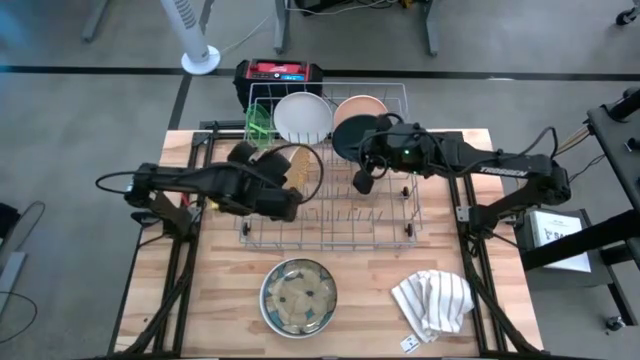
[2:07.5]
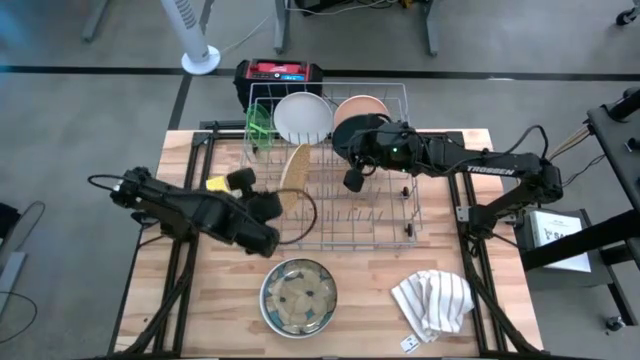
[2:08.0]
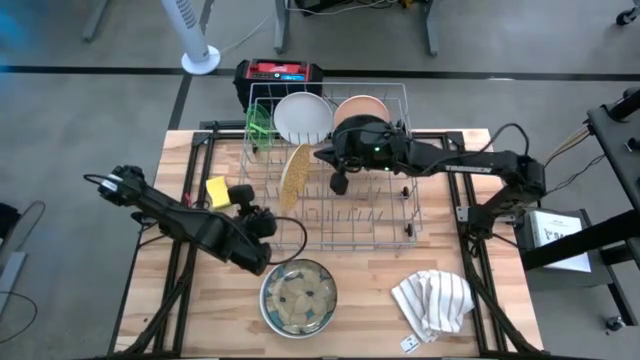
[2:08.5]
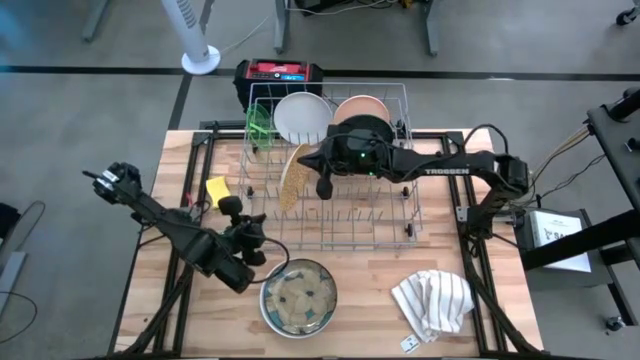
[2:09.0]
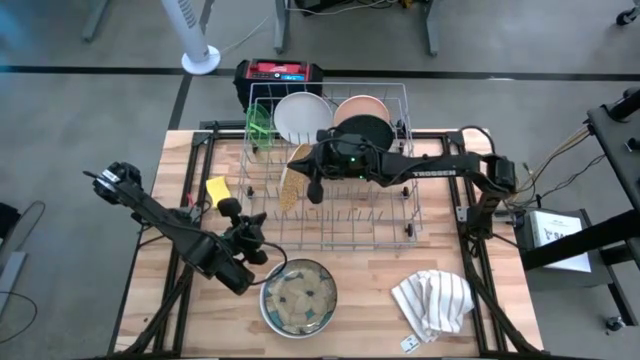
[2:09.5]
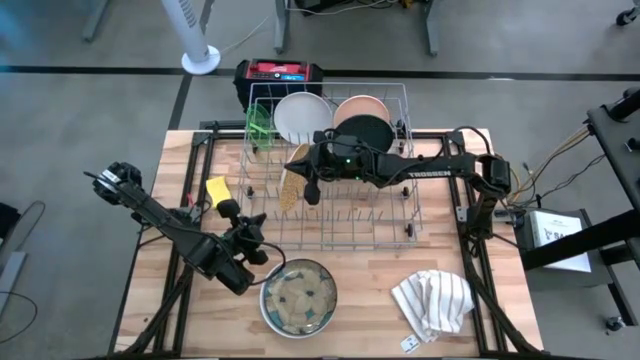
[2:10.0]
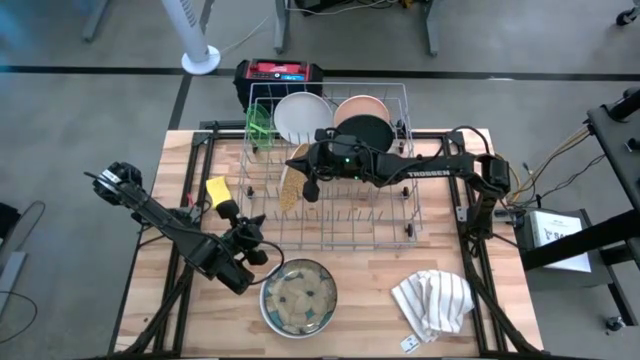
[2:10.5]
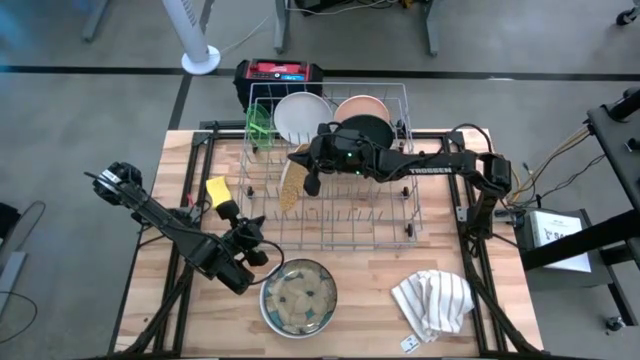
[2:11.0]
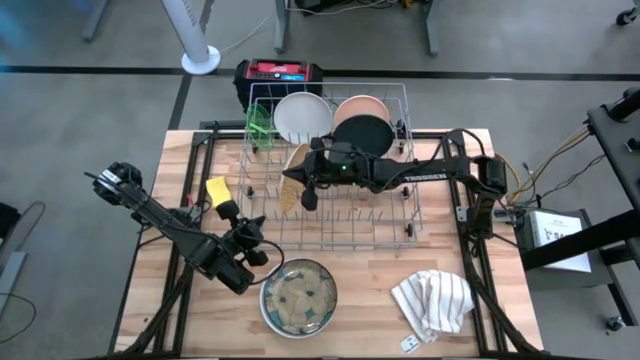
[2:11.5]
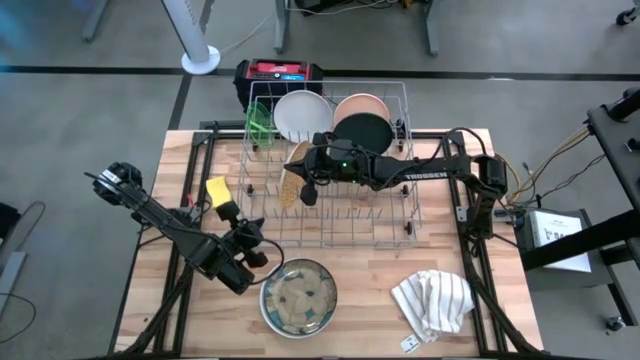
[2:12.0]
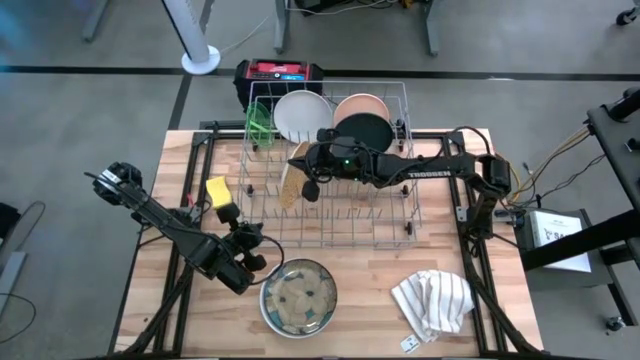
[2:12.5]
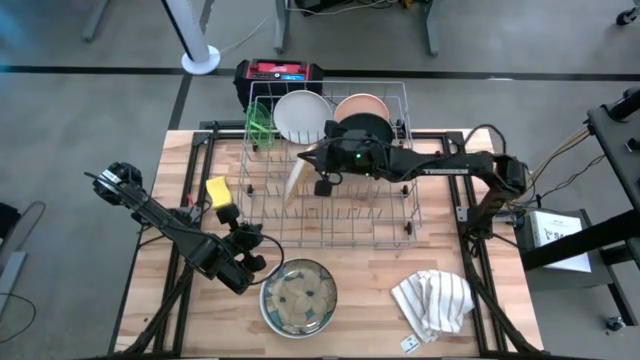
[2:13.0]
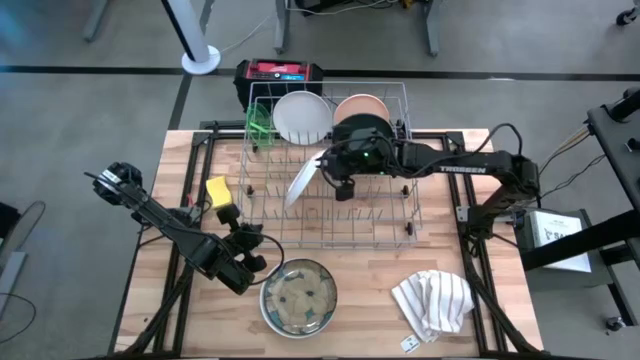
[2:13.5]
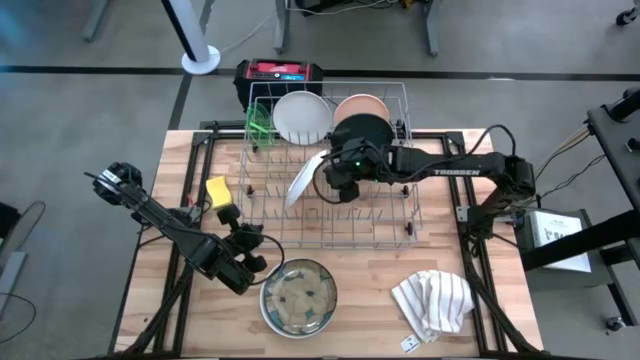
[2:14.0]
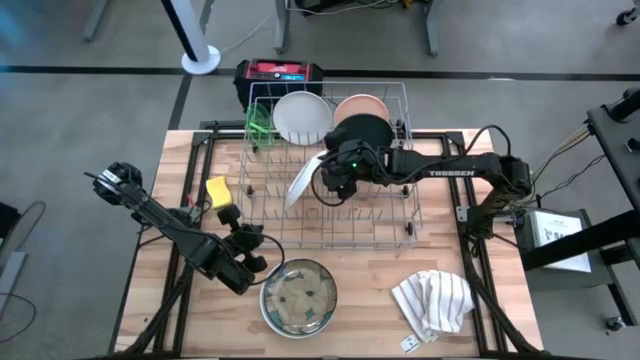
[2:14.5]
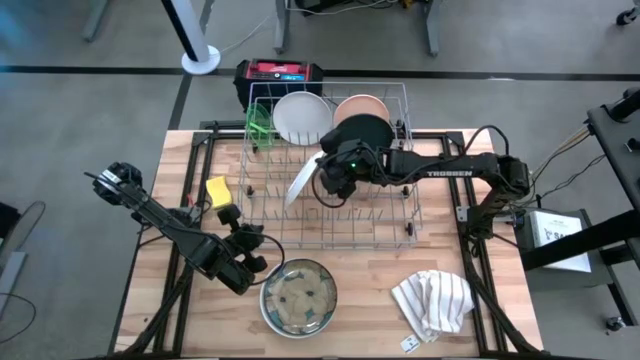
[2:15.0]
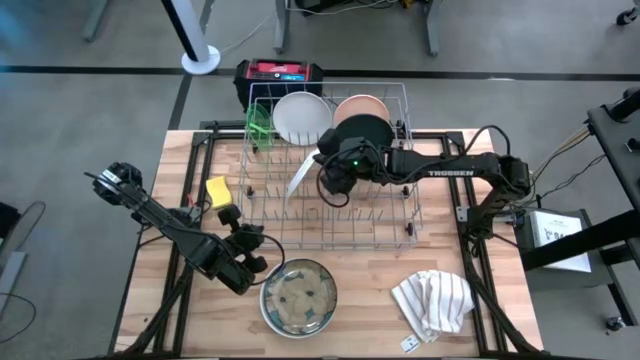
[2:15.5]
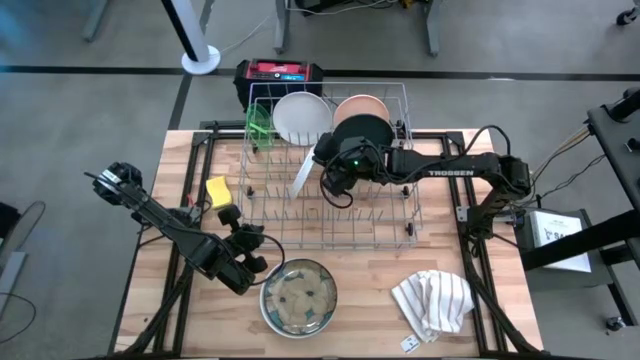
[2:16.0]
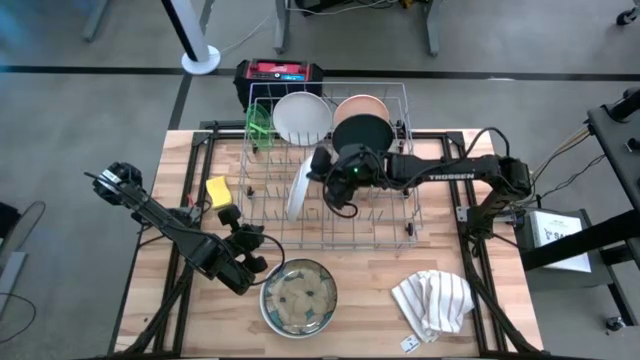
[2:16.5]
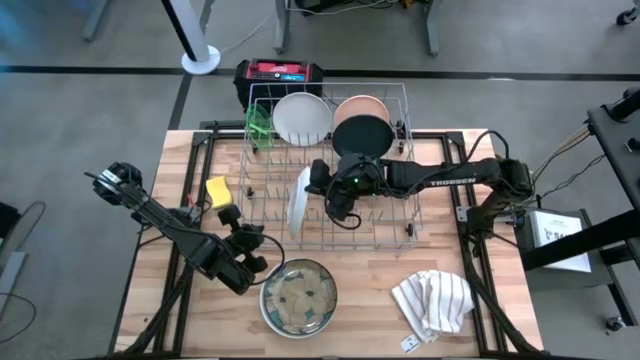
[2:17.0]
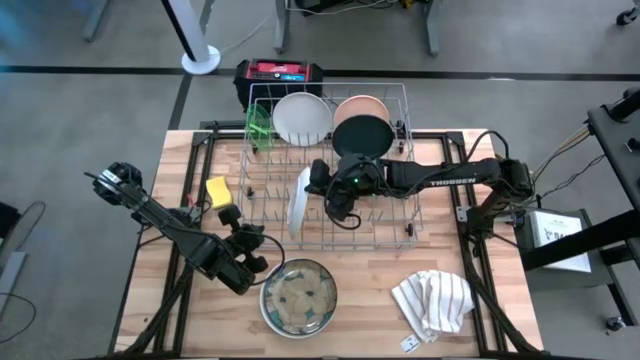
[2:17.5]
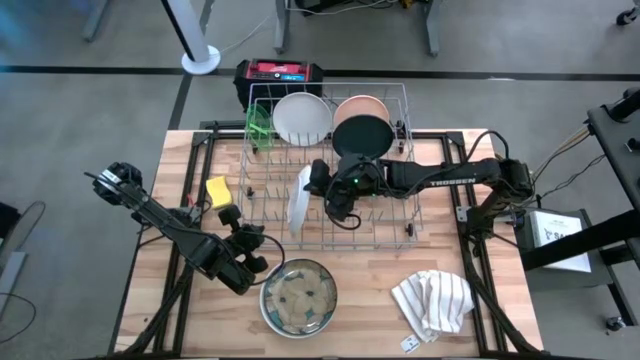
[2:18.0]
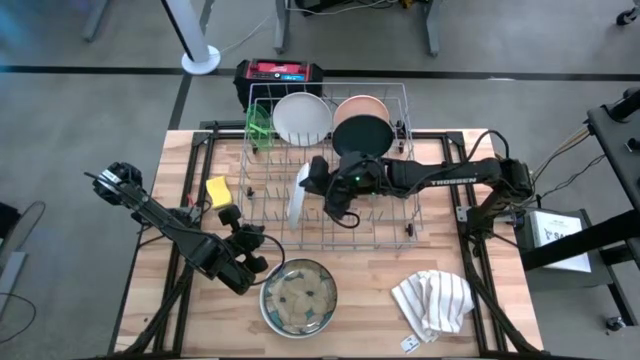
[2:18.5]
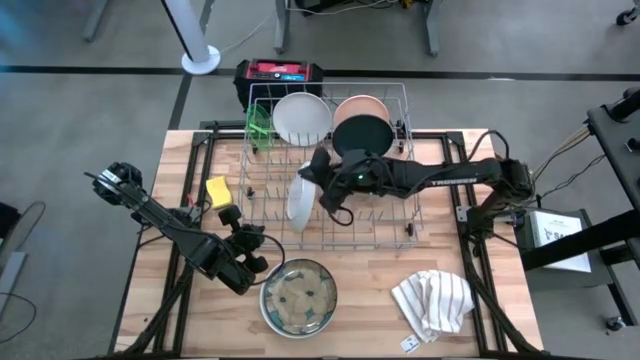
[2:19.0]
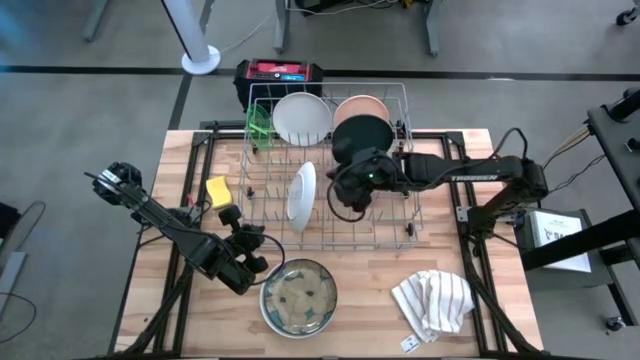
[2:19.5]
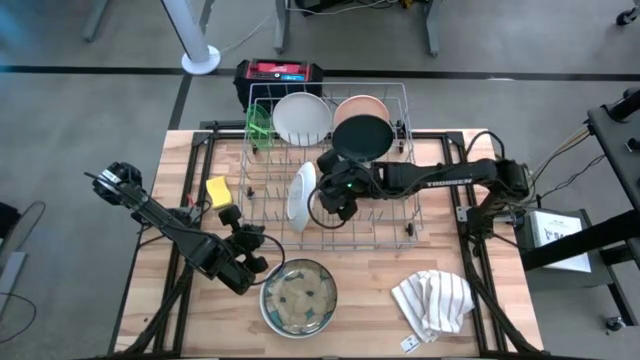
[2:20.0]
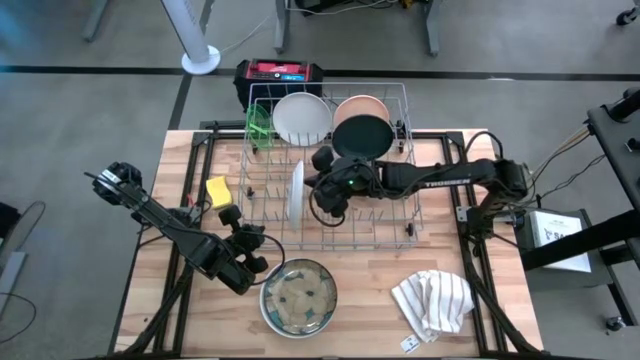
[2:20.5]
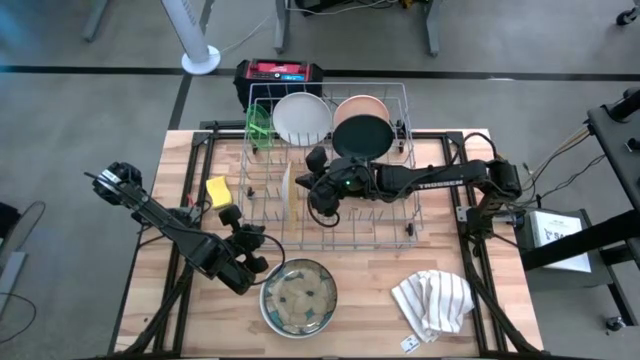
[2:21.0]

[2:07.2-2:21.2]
Task: Sort dishes
Adjust the yellow plate on the dish rack

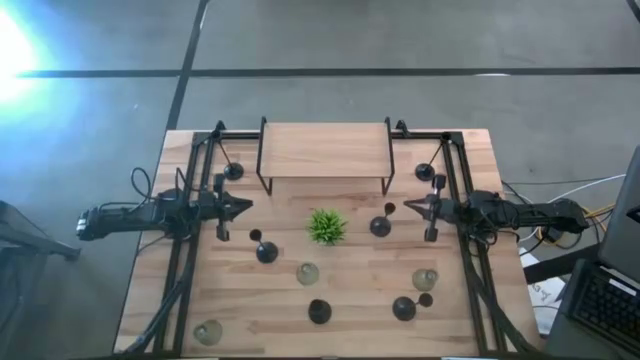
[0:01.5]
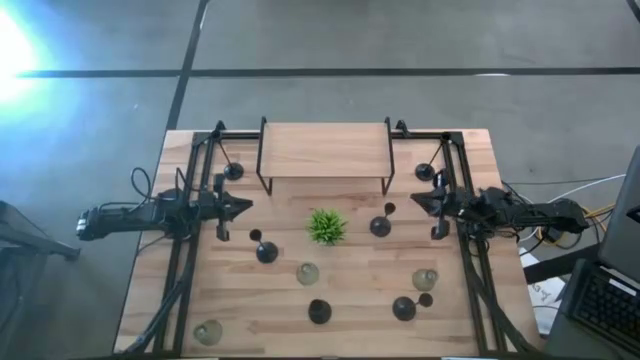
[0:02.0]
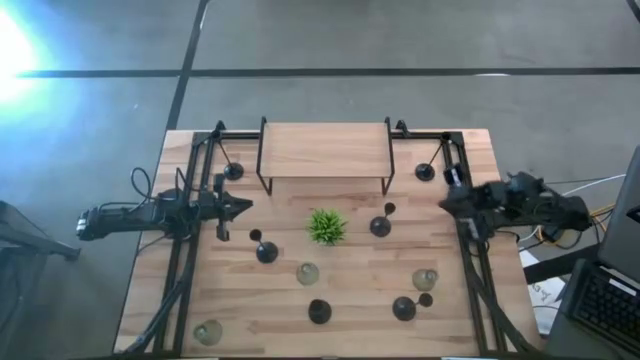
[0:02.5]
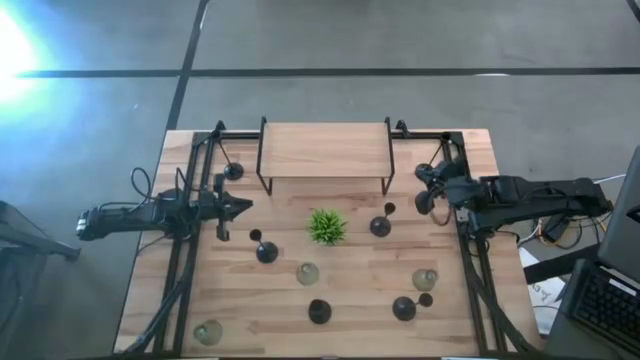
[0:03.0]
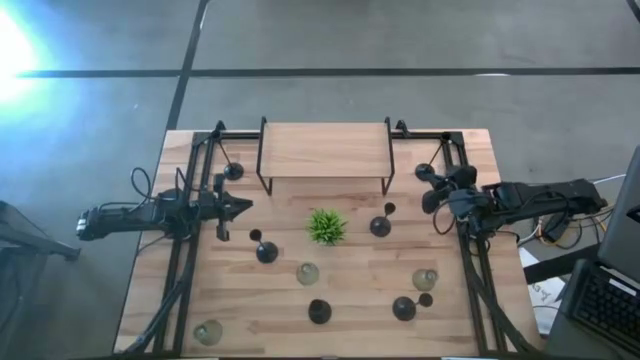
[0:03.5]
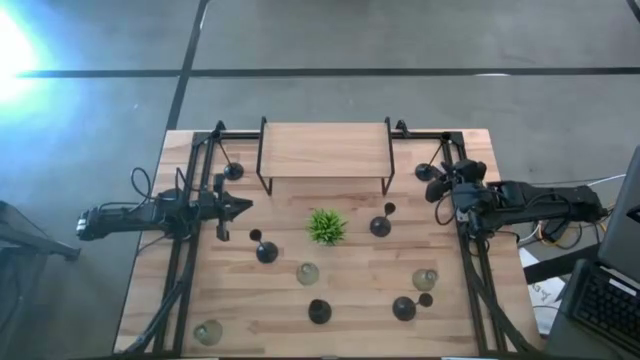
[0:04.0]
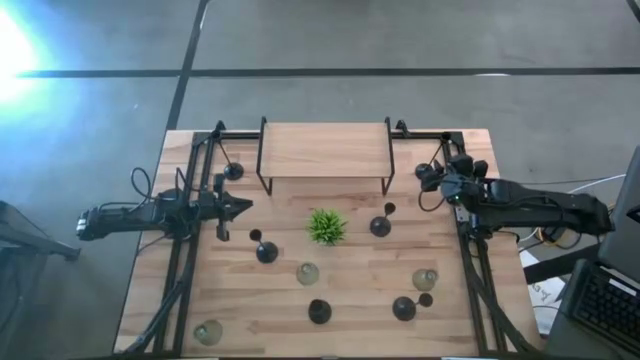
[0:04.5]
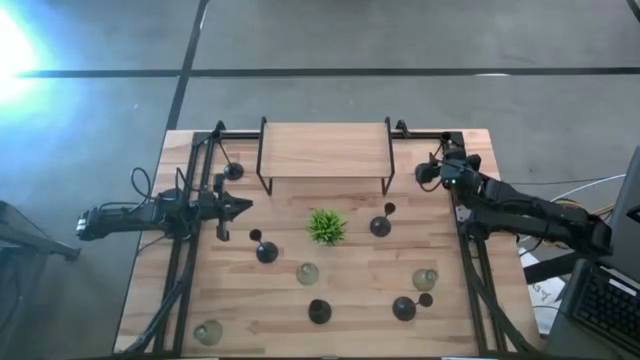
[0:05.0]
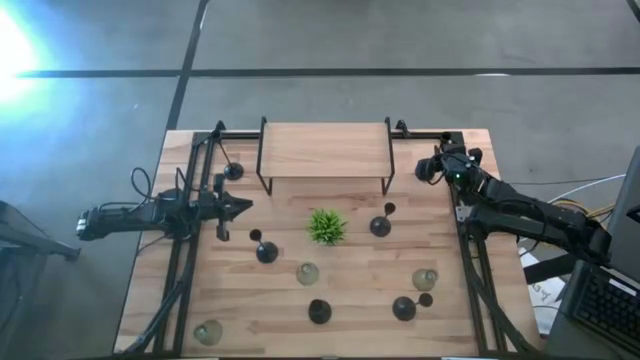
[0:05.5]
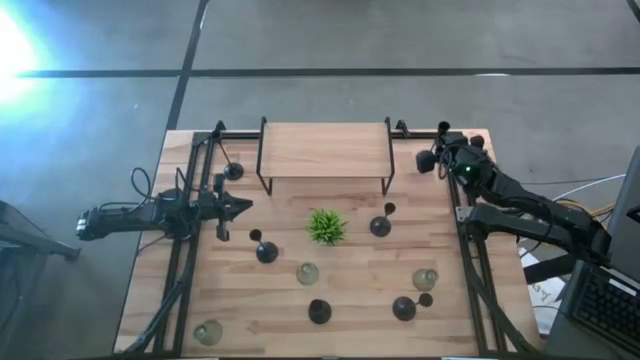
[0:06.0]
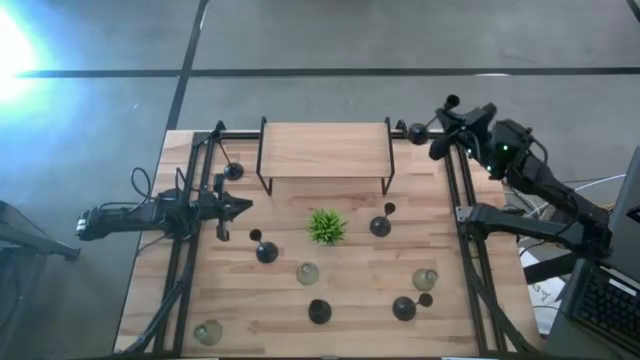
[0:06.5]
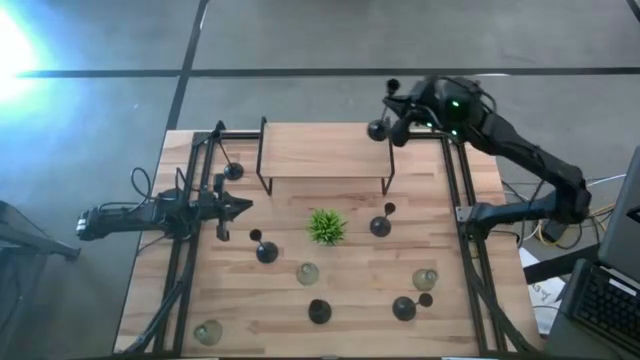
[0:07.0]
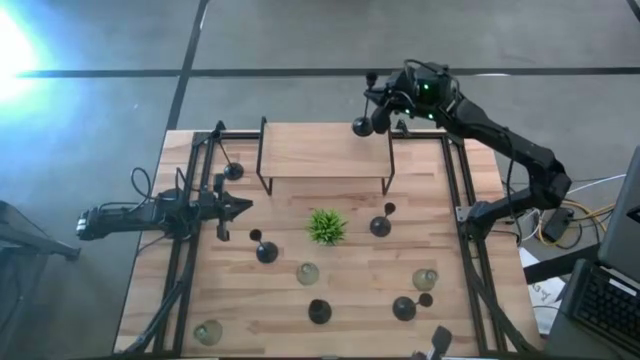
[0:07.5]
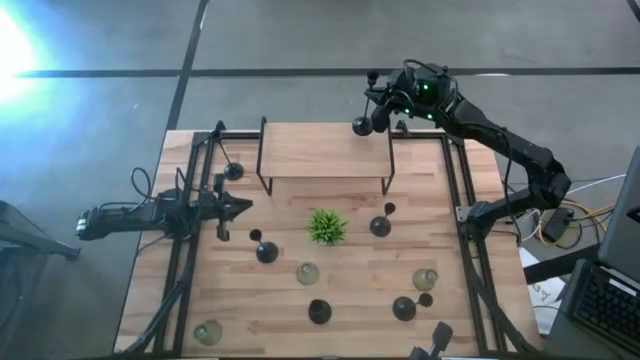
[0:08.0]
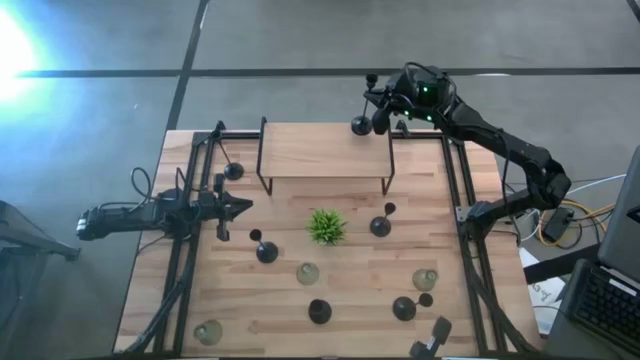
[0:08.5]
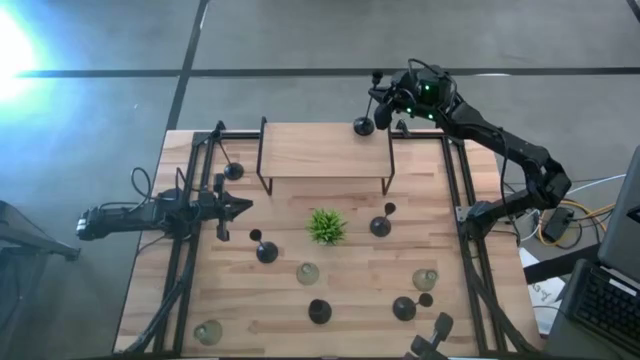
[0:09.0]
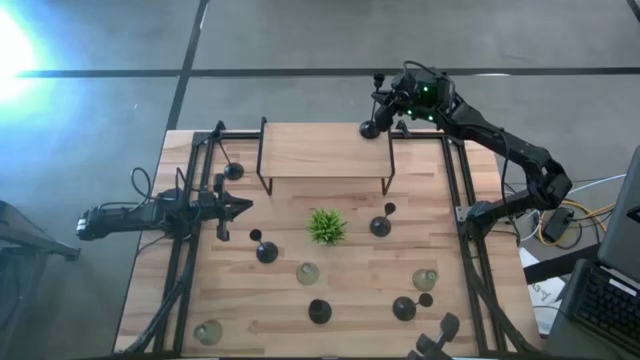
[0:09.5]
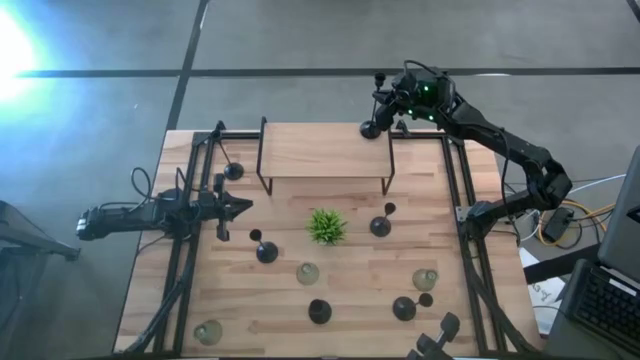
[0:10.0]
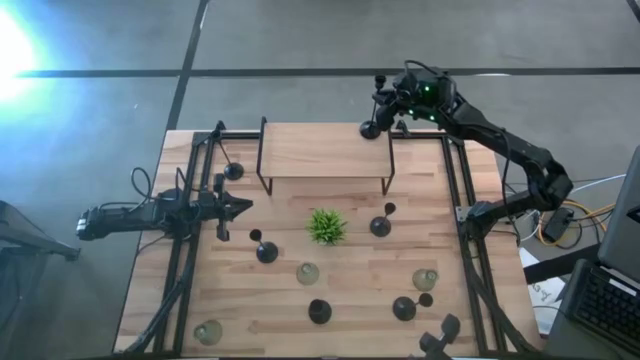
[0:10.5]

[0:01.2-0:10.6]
Task: Pick & Place candle stick holders
Put the large black candle holder on the shelf
